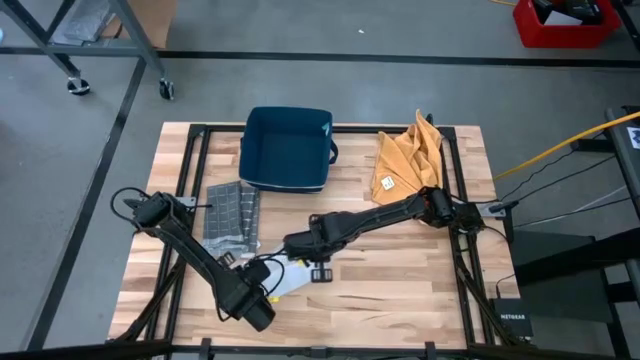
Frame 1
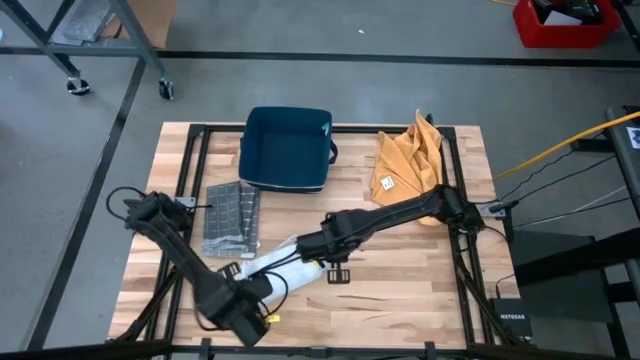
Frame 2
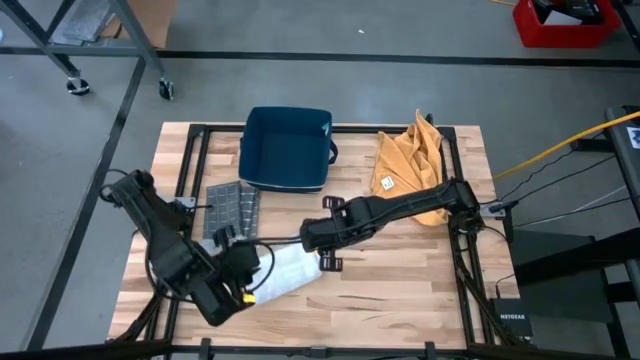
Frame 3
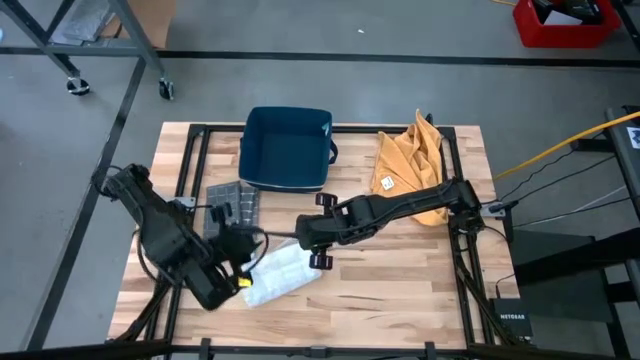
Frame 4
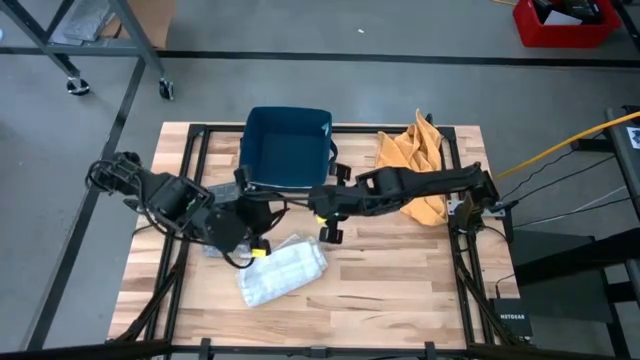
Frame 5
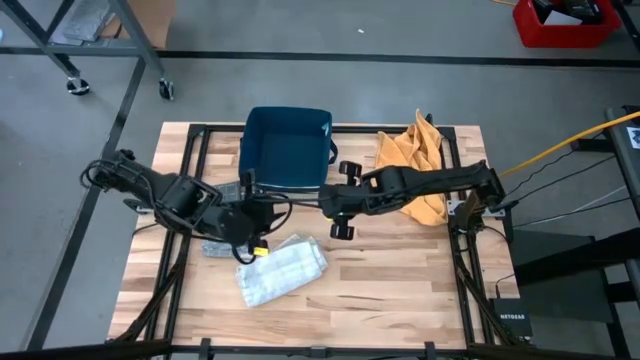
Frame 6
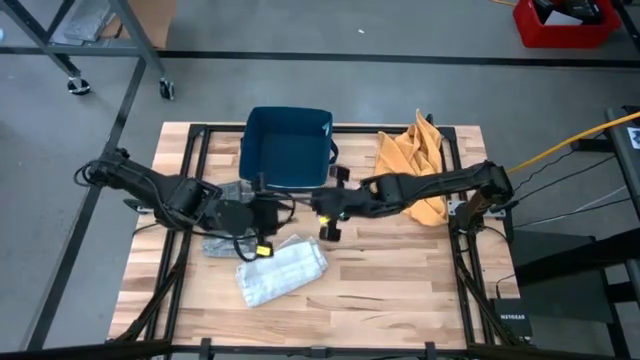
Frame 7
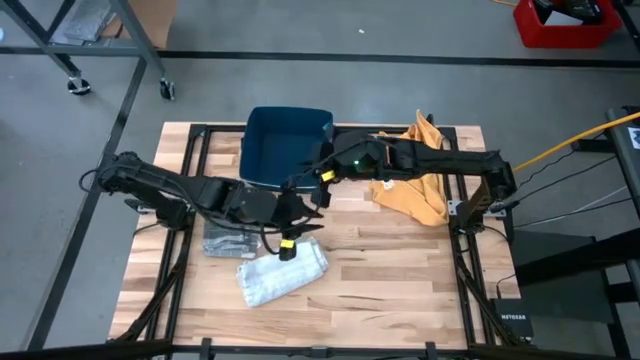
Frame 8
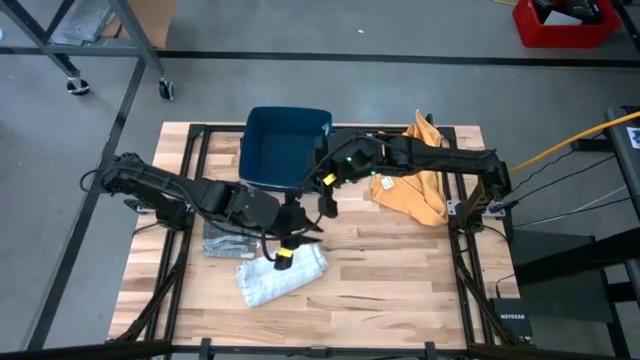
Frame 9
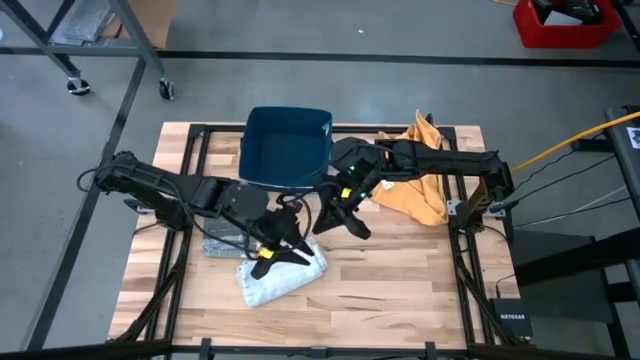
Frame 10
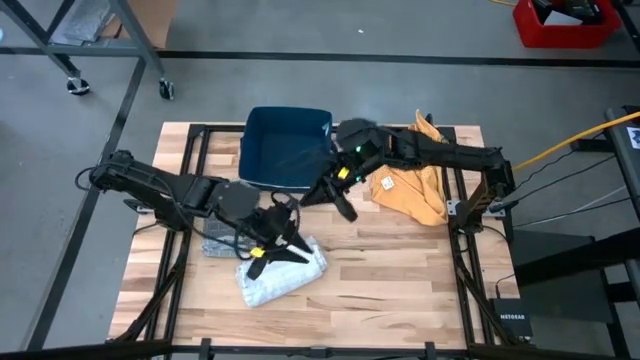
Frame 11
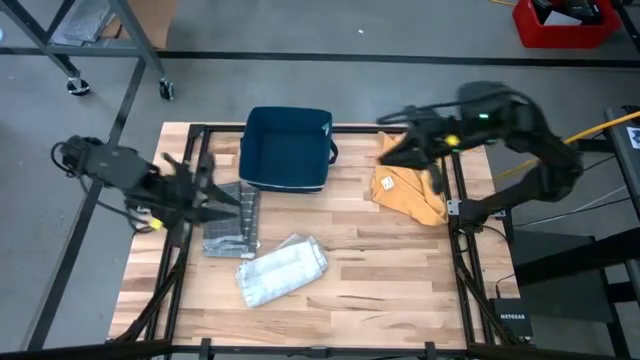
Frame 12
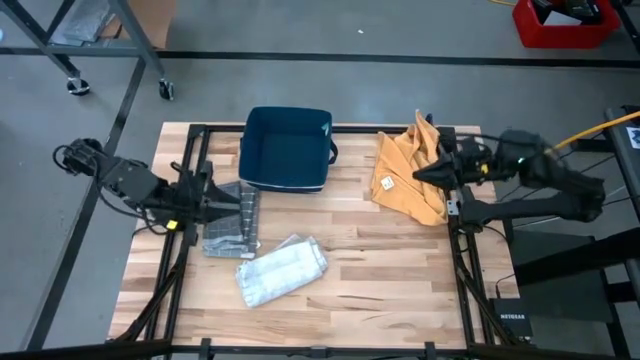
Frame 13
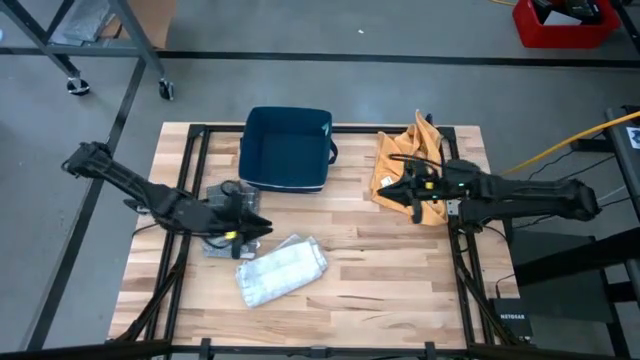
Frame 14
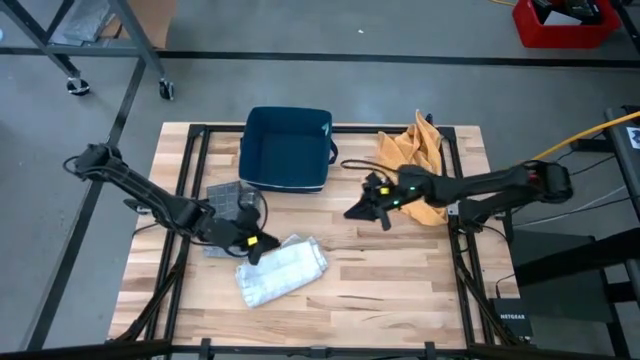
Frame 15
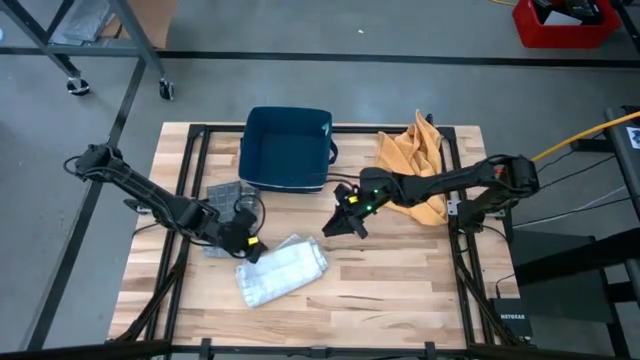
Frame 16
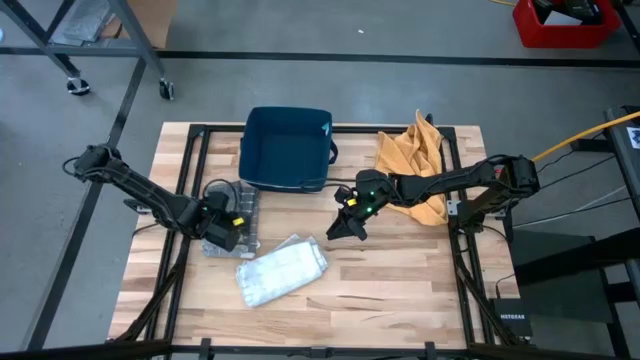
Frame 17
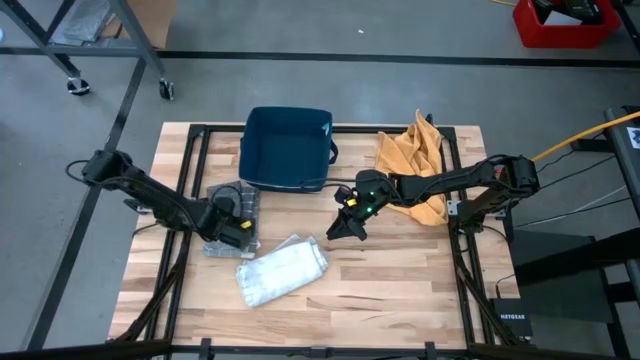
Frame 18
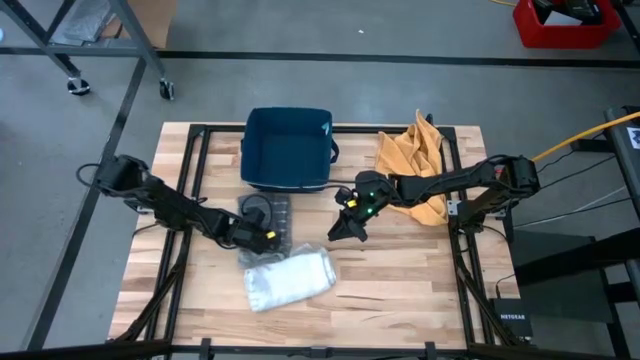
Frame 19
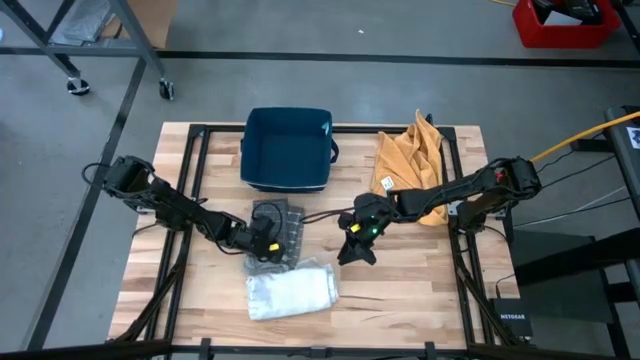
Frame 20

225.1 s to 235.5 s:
Task: Fold towel
Move the gray patterned towel to the center

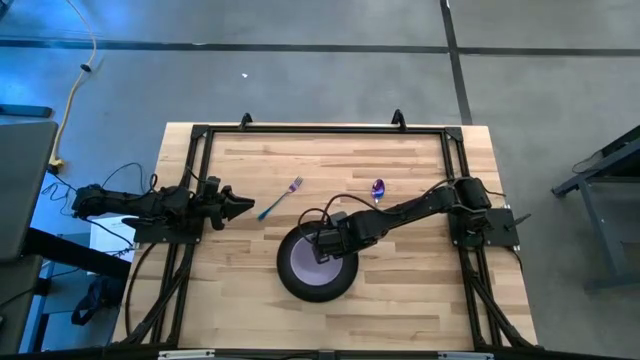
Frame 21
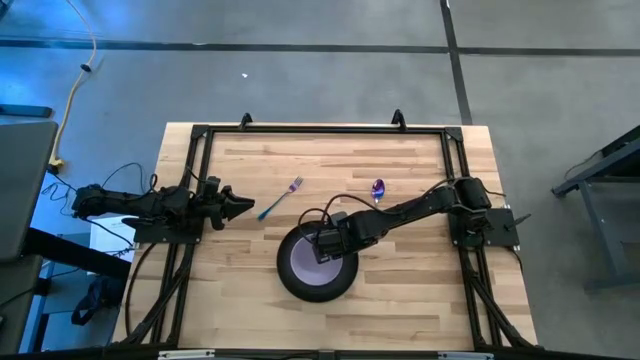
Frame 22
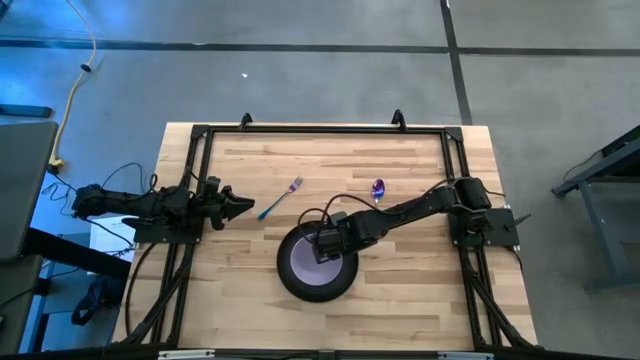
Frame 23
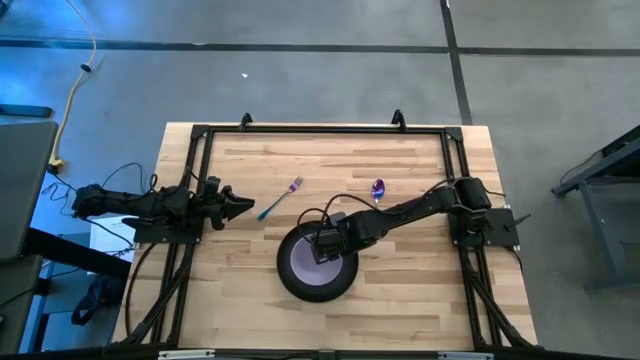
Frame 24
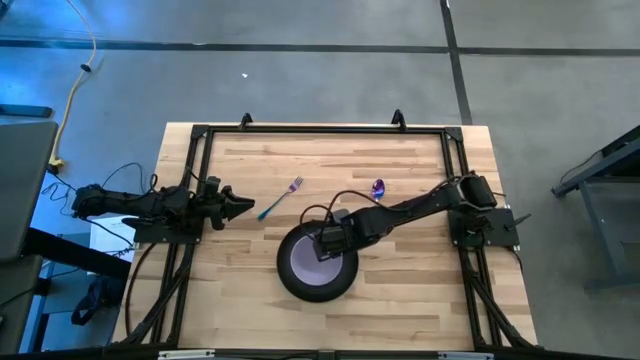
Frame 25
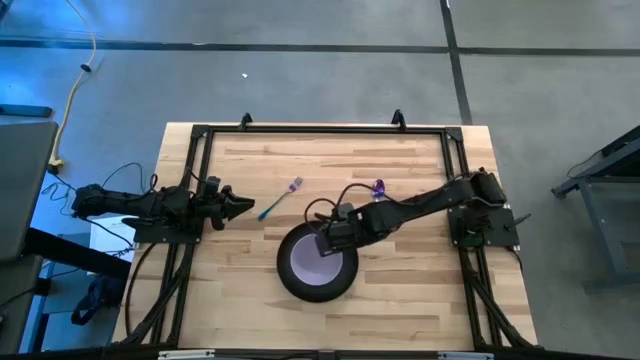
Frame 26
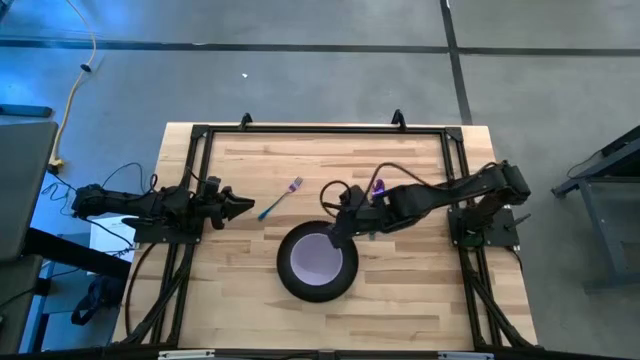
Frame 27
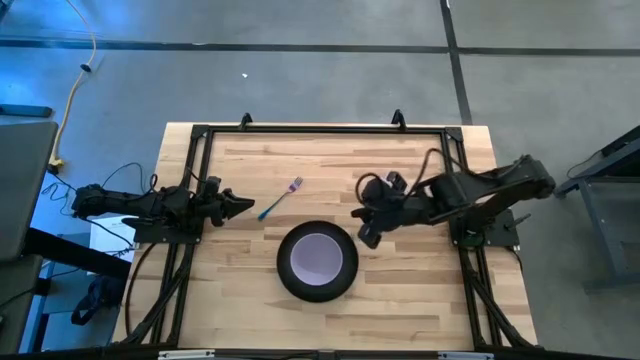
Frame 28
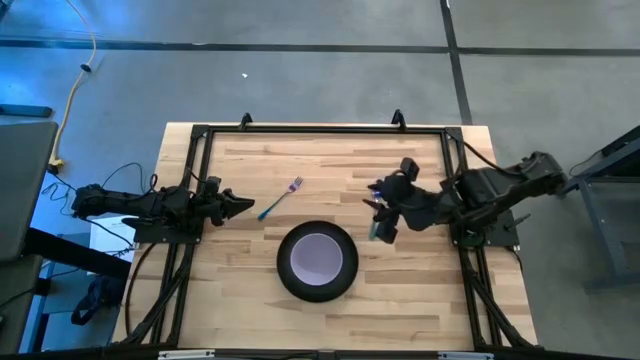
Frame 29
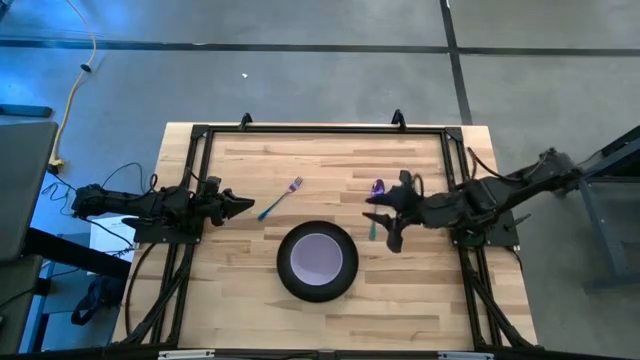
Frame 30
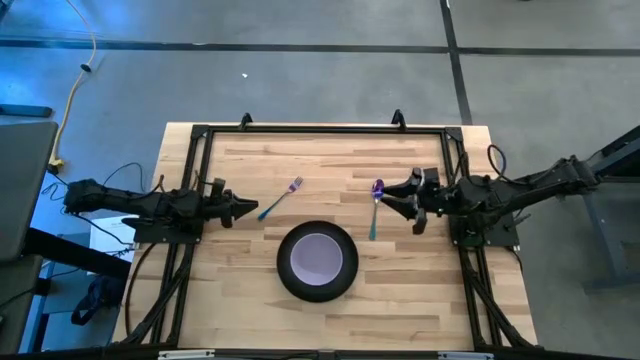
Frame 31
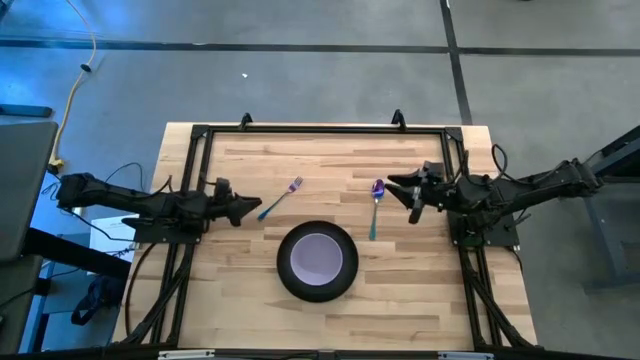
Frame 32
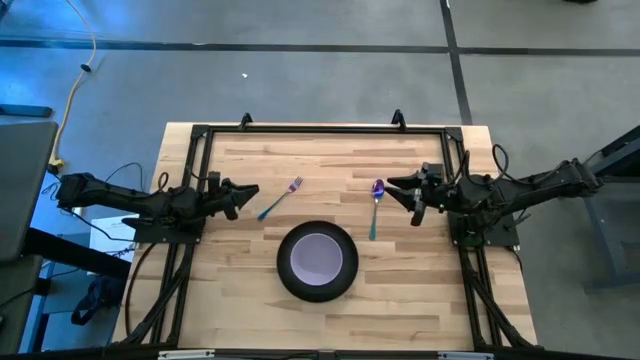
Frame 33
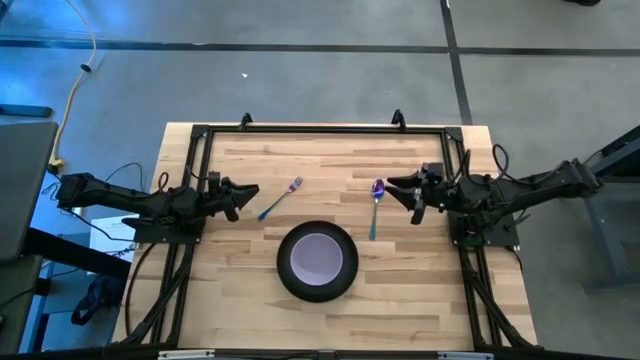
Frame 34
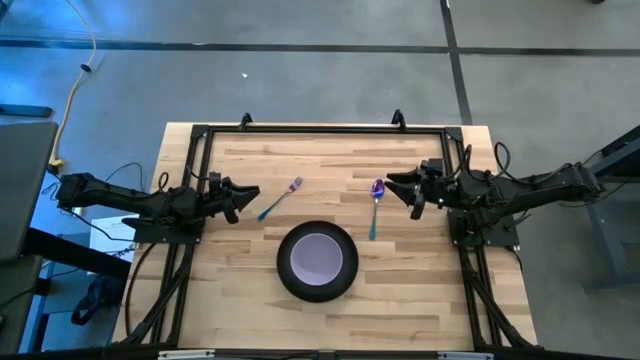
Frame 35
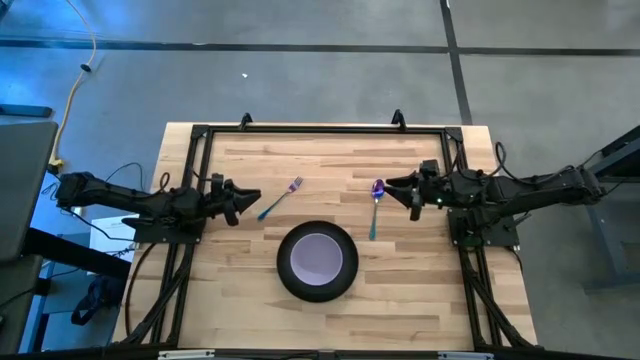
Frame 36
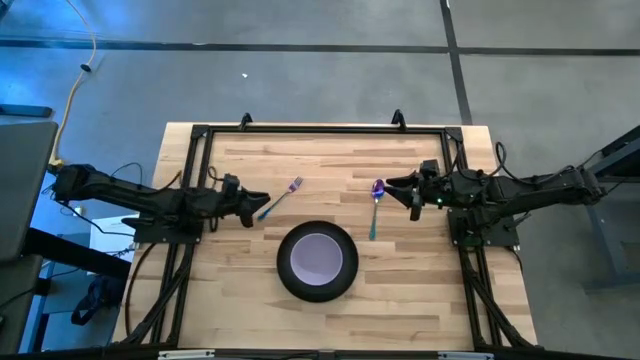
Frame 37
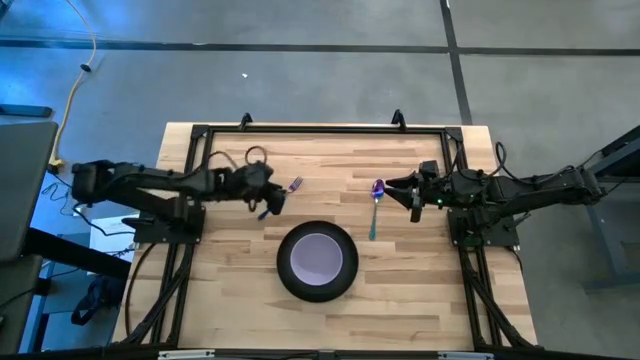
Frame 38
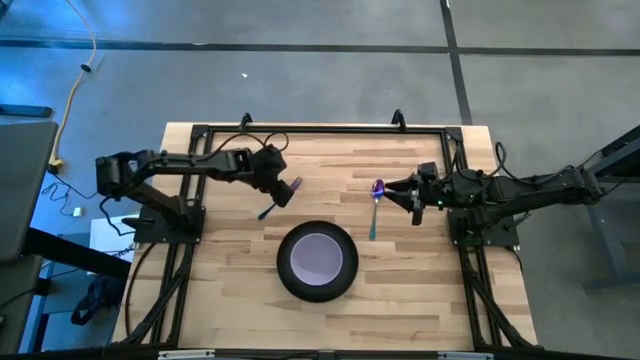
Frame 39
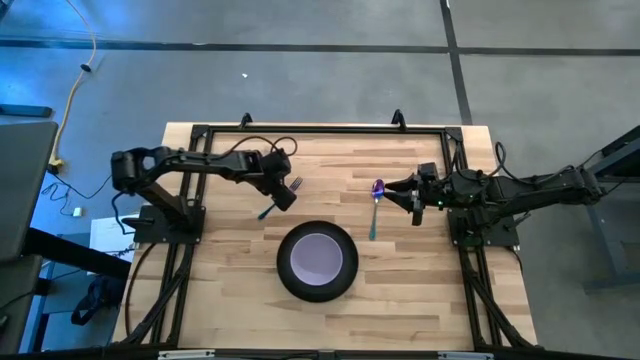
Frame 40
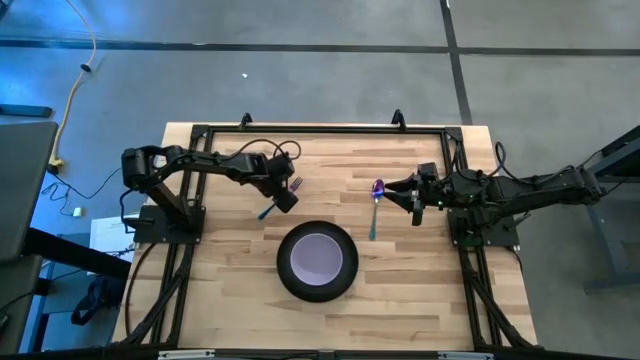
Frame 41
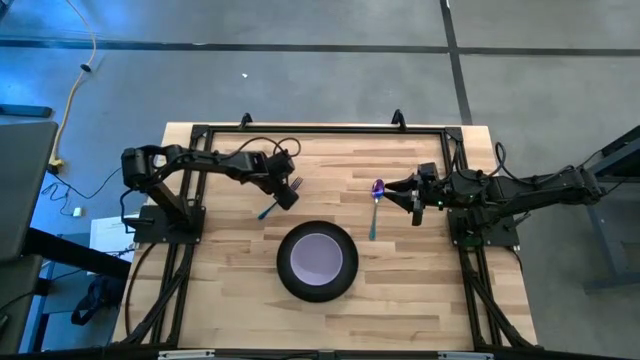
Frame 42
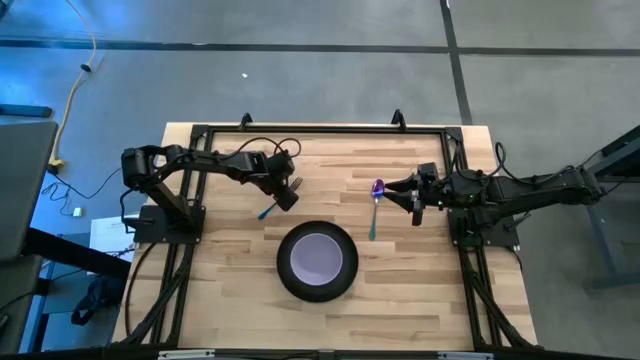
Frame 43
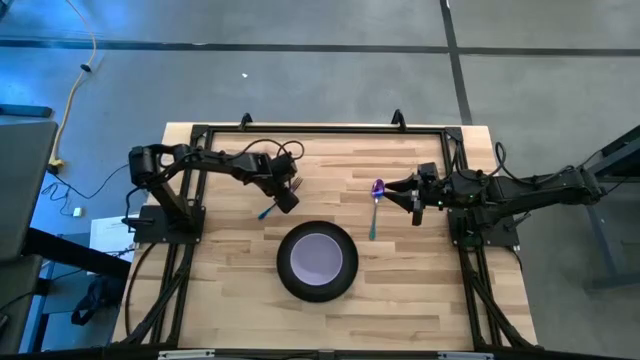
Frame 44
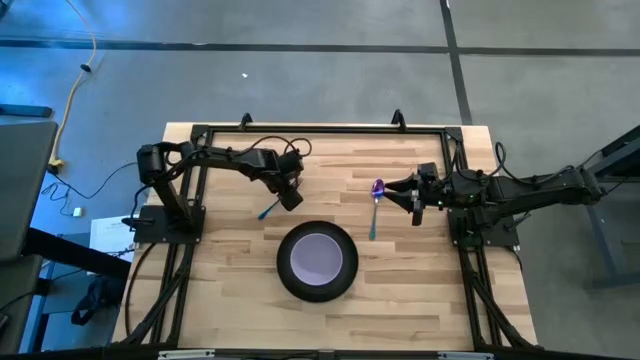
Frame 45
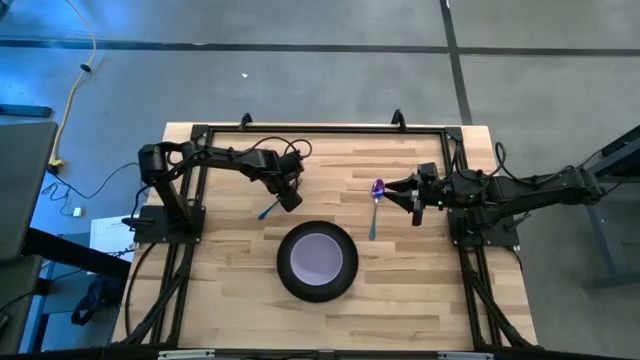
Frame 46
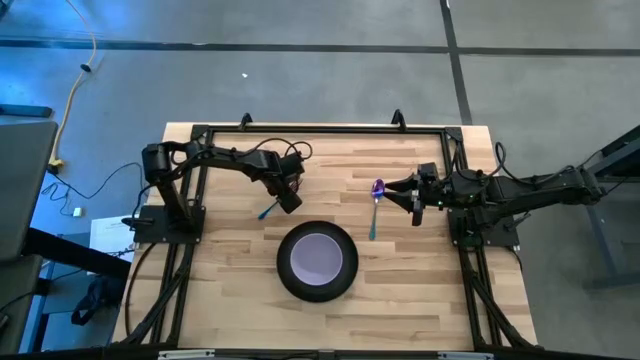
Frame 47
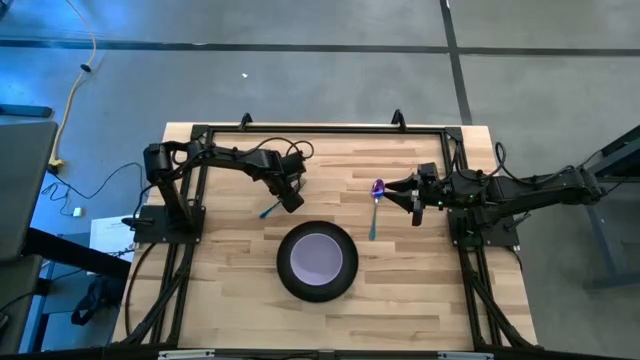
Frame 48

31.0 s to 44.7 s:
Task: Set table place
Put the violet fork to the left side of the black plate
